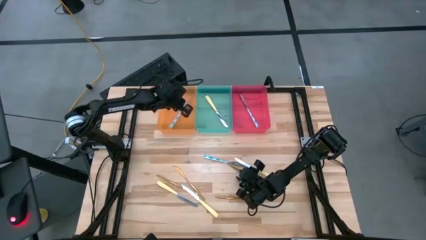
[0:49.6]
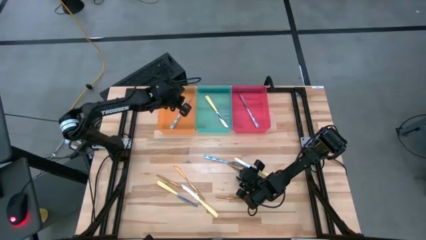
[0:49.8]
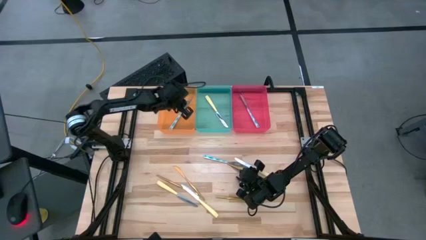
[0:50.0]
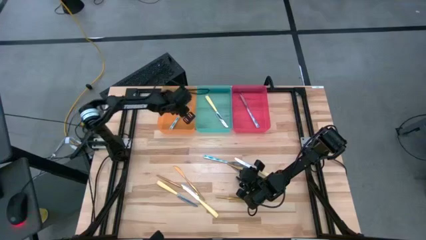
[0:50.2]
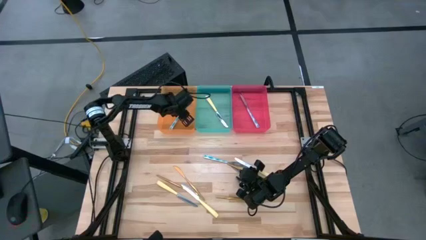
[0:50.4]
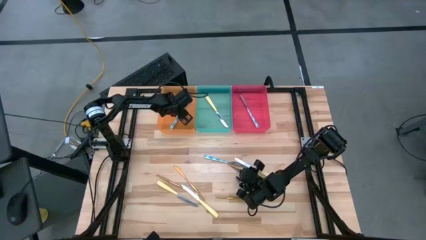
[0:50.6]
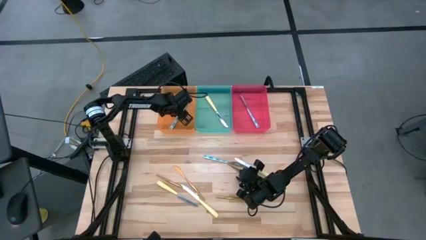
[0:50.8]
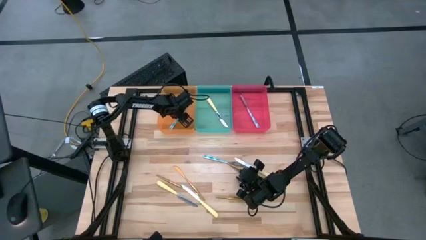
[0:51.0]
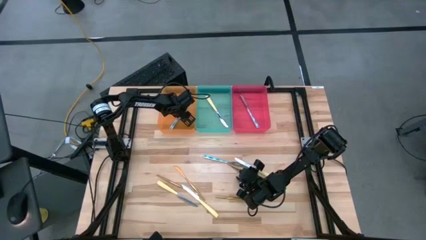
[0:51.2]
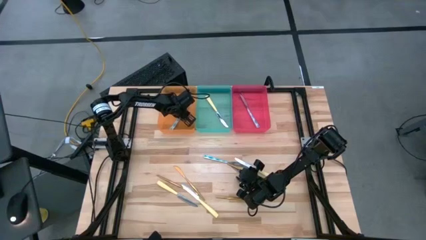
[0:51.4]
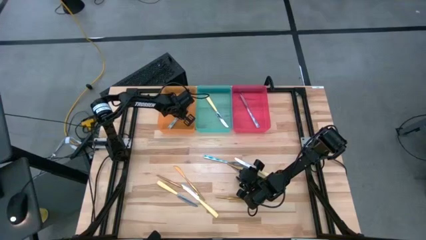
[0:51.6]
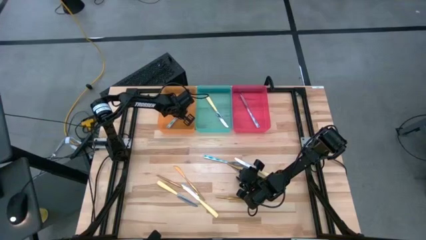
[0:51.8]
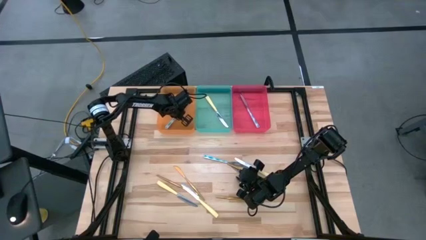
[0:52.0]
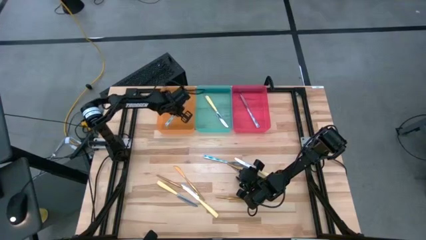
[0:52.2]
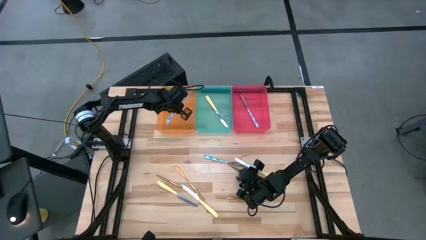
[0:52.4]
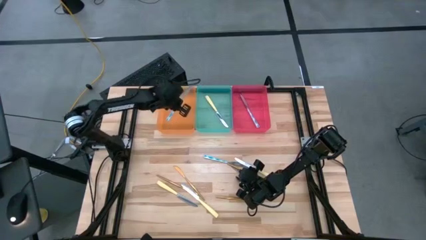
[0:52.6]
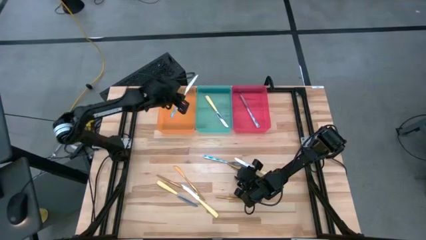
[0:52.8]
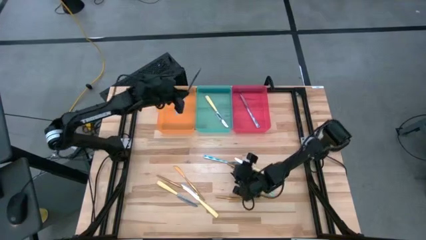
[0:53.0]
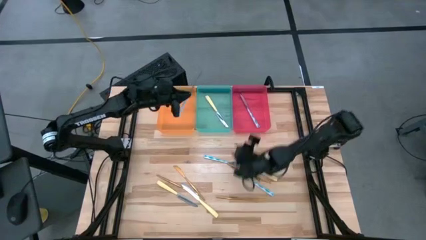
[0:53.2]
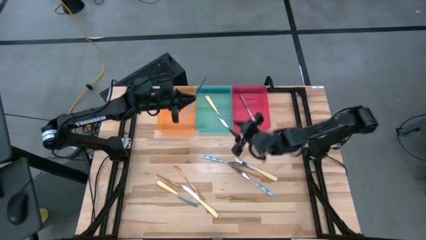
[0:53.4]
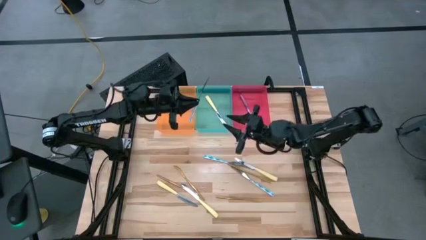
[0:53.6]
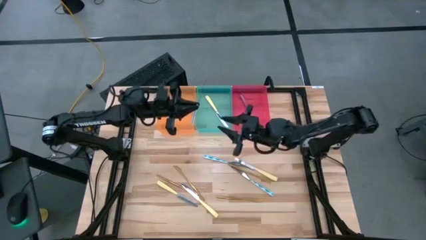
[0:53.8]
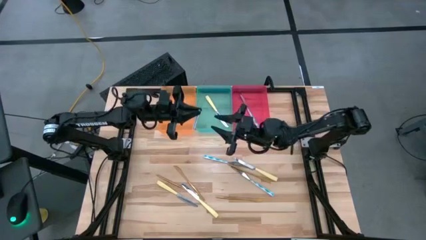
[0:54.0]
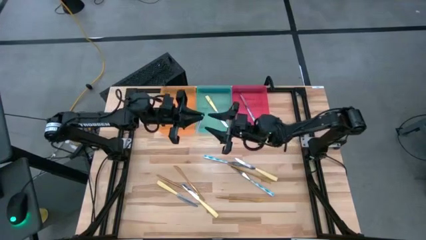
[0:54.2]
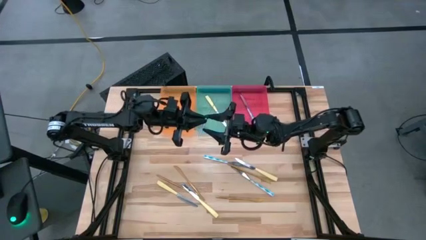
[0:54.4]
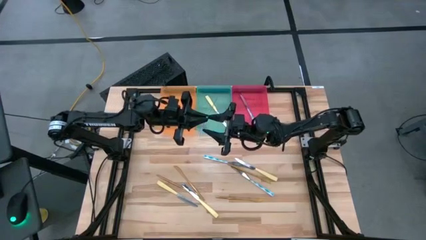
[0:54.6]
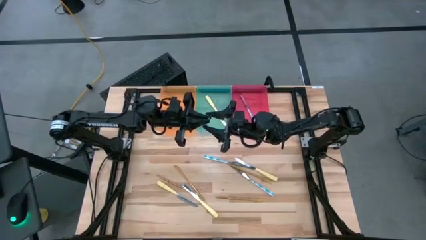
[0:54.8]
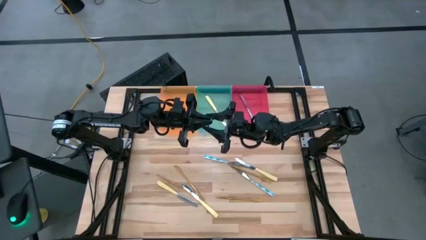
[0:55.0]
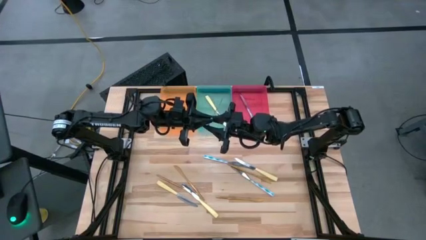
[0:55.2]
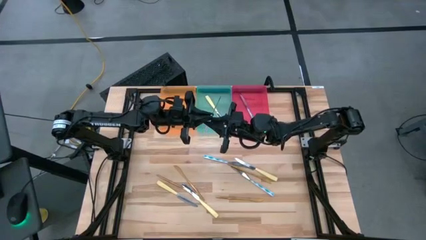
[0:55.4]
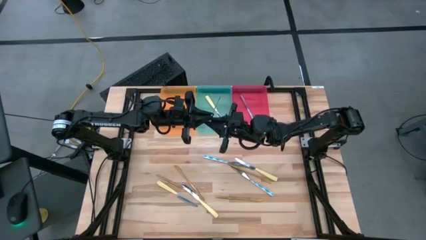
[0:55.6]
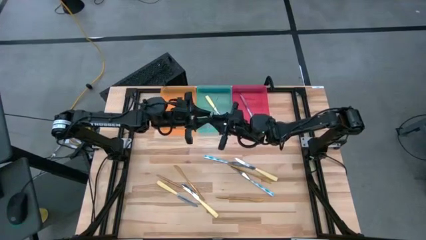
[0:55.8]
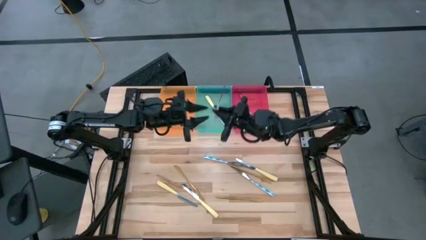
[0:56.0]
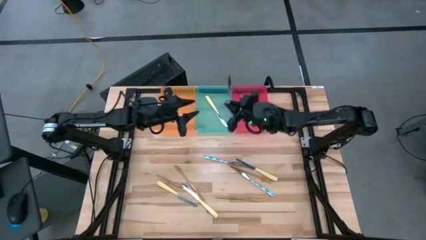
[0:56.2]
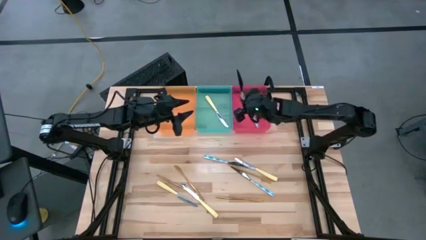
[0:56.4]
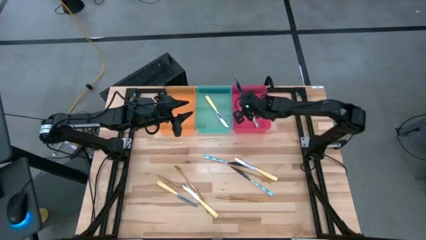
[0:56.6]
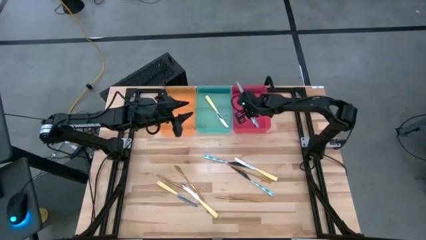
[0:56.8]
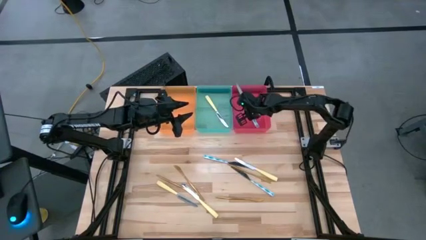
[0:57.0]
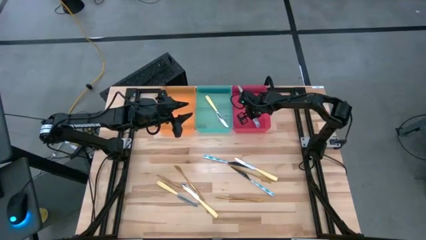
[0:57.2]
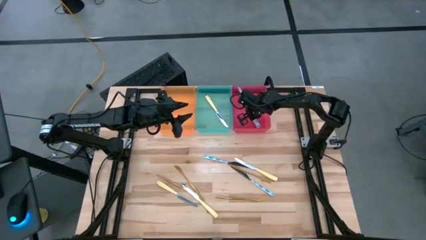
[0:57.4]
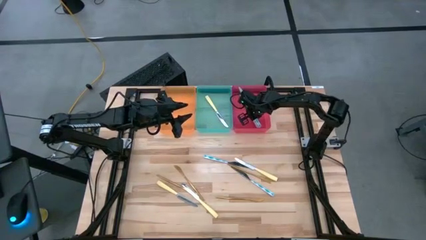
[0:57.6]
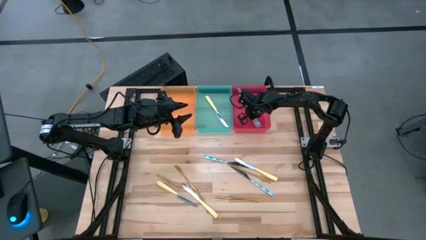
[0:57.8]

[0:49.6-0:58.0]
Task: Sort silverware by color (type)
Put the blue patterned table knife into the red bin

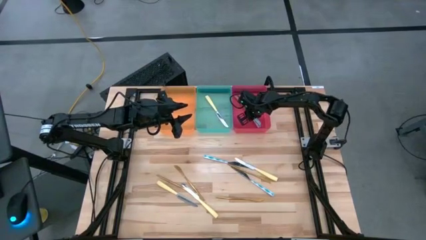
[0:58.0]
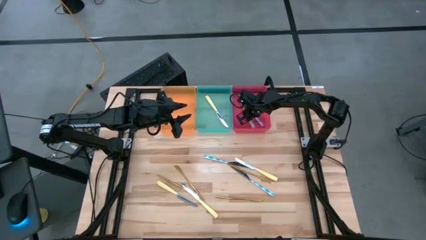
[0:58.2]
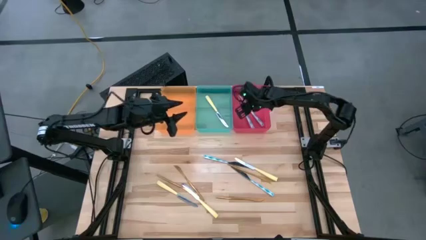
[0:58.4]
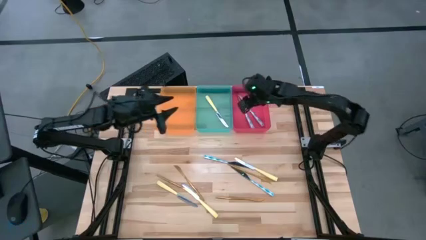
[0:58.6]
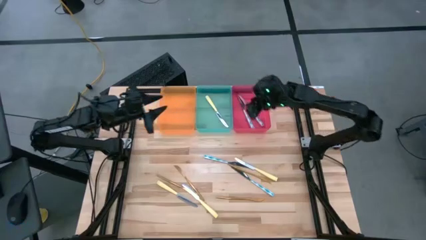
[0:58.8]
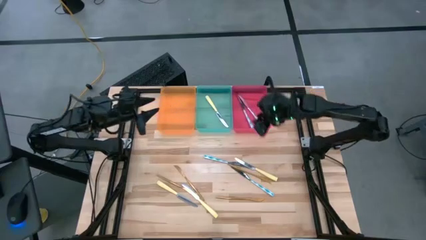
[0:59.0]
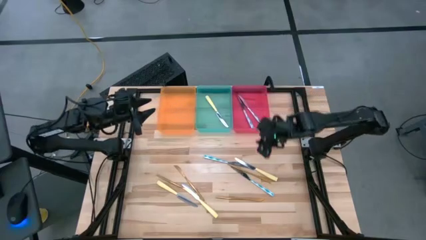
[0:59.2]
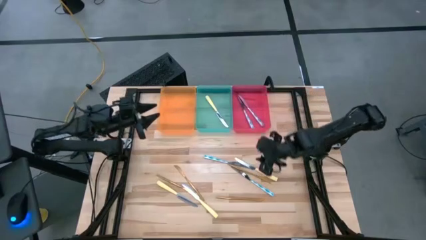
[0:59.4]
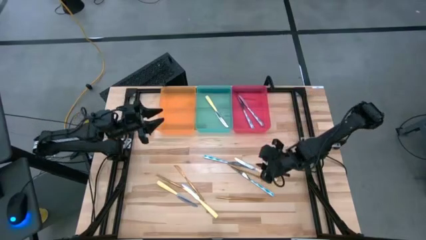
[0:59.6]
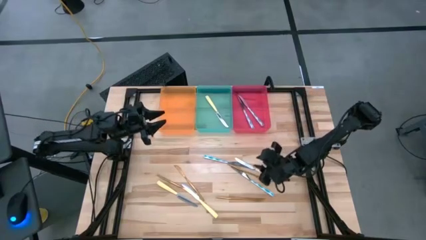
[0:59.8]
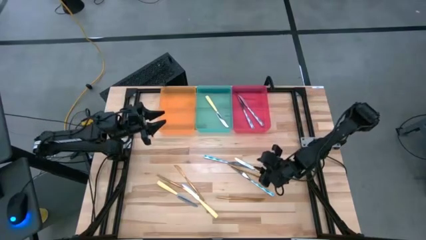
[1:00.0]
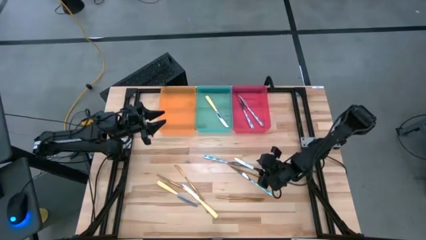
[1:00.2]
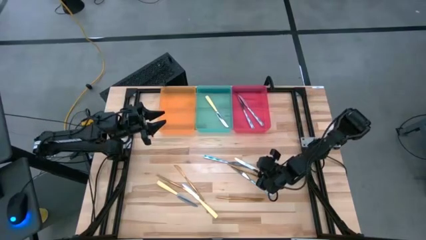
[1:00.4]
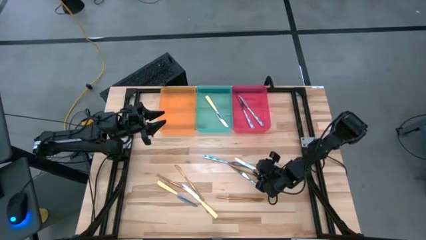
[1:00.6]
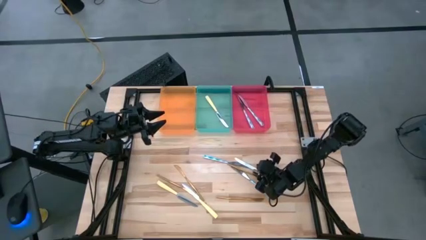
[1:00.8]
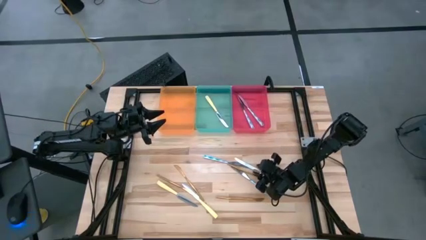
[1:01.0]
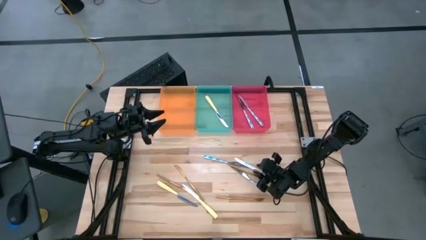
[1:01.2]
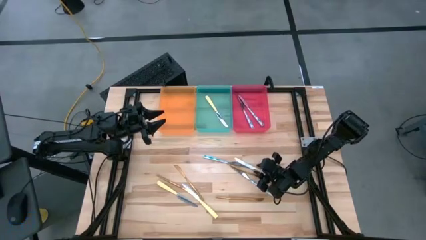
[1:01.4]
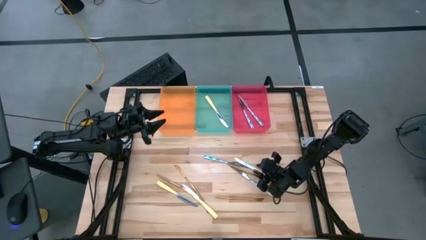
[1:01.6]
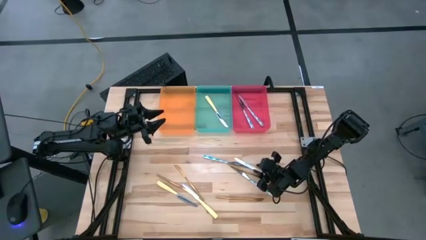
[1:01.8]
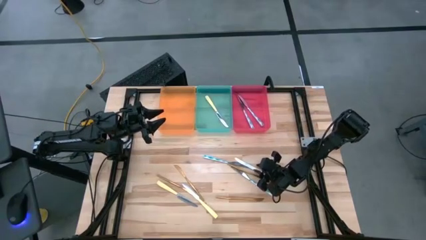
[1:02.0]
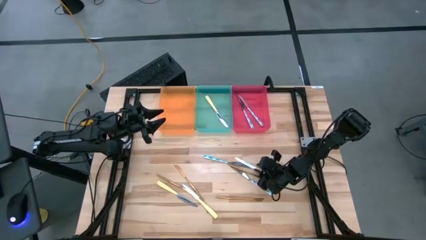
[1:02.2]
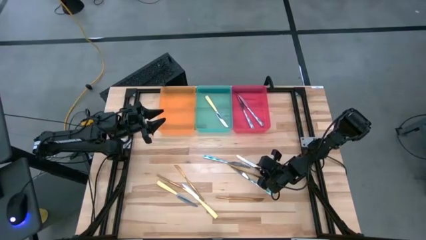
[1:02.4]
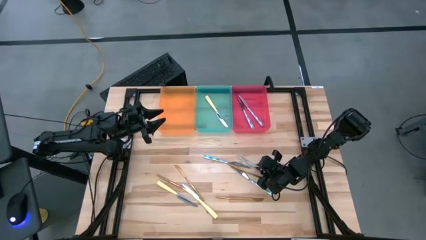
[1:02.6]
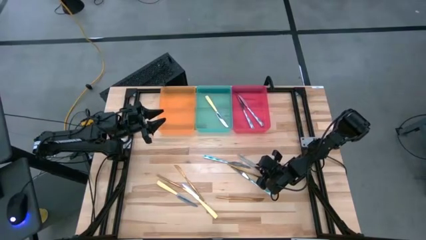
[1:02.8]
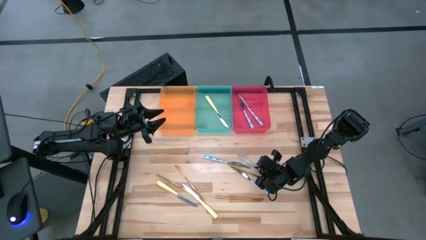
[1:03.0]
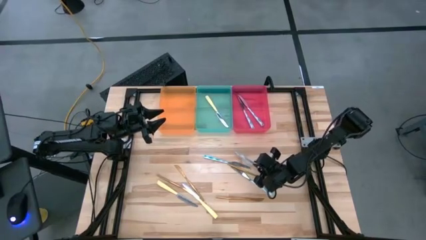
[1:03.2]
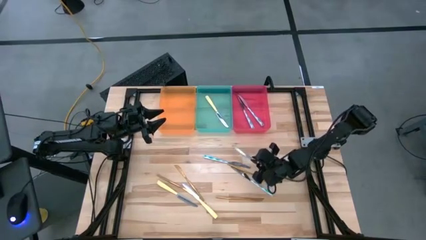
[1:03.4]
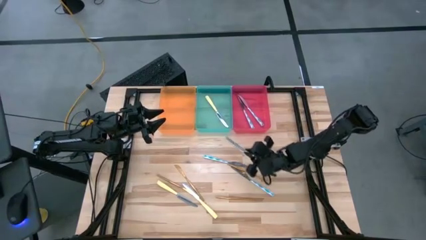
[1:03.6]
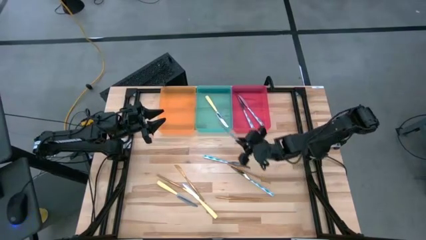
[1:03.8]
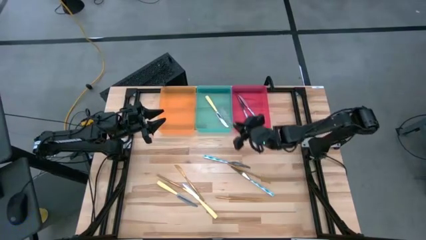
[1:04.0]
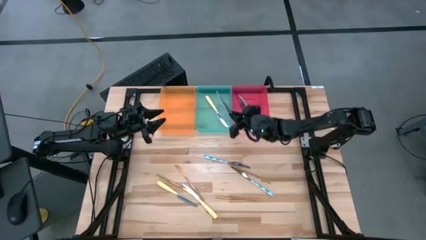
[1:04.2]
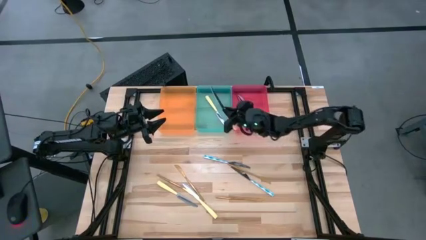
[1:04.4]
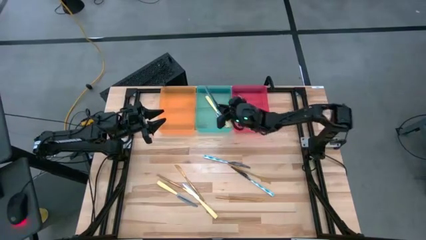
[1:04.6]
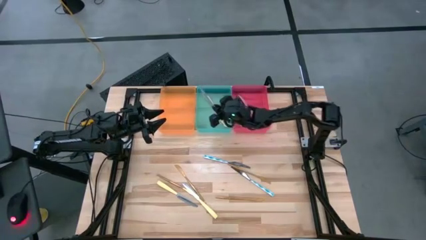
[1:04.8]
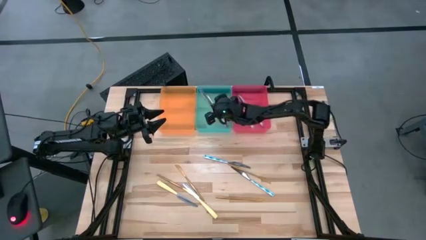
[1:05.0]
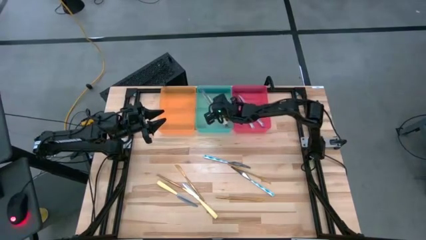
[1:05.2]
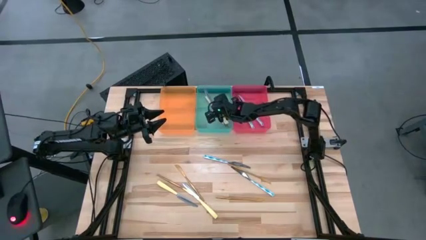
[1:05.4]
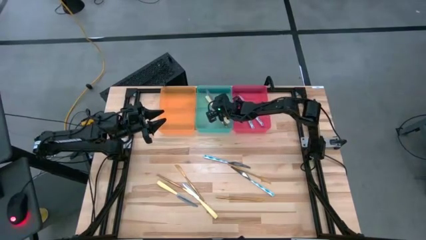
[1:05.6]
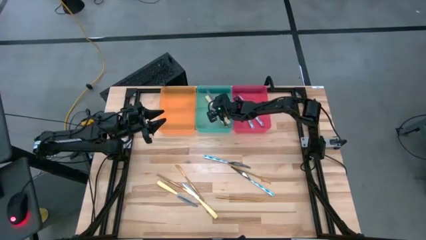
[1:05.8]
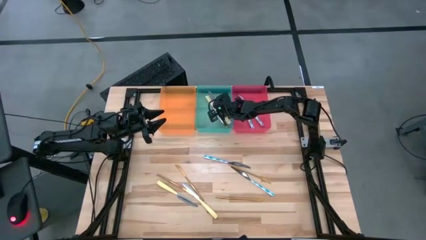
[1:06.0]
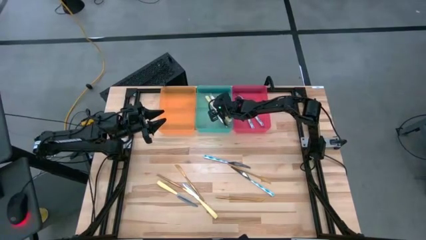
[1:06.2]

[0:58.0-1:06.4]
Put the yellow table knife into the blue bin
